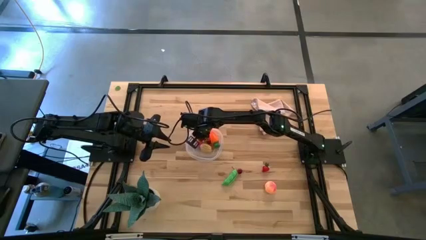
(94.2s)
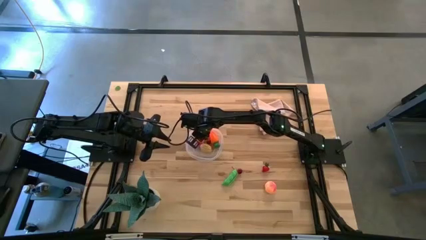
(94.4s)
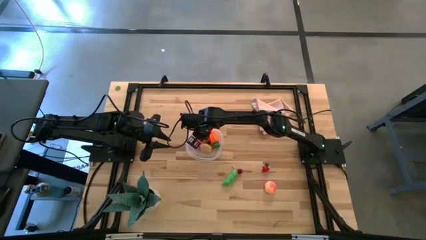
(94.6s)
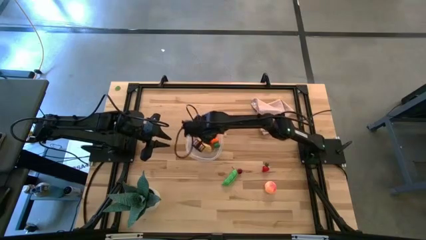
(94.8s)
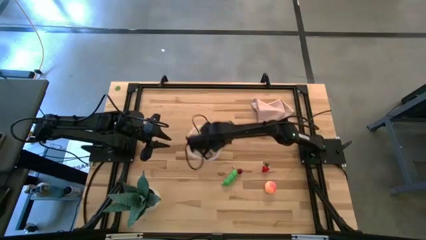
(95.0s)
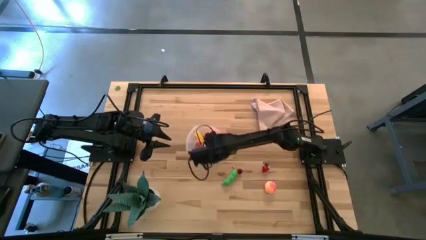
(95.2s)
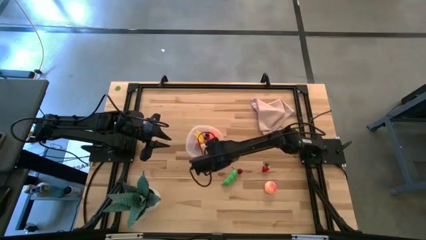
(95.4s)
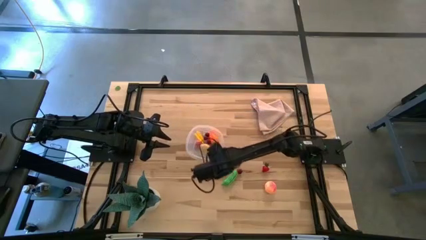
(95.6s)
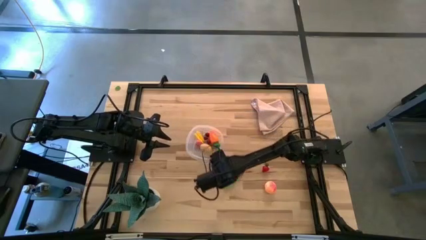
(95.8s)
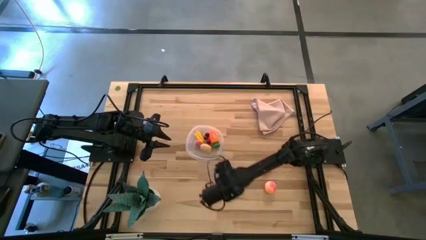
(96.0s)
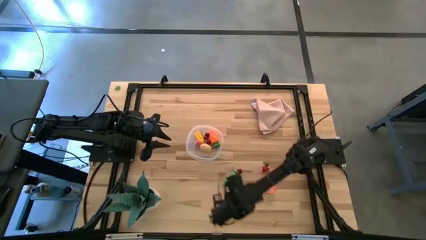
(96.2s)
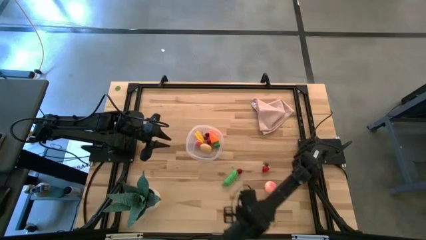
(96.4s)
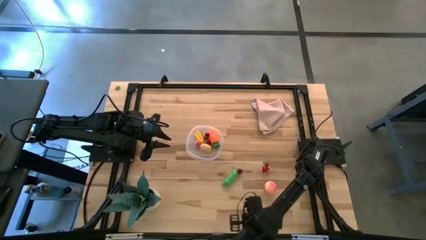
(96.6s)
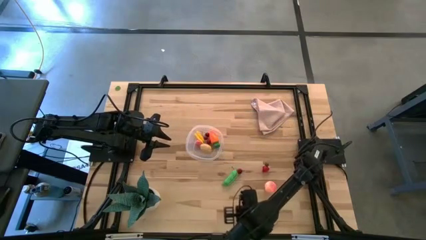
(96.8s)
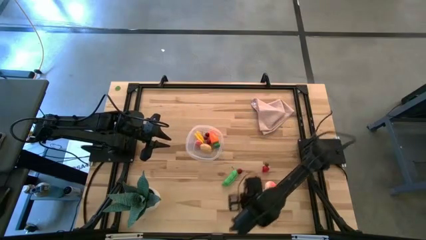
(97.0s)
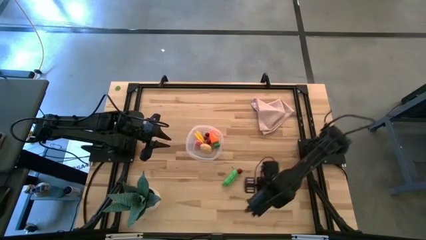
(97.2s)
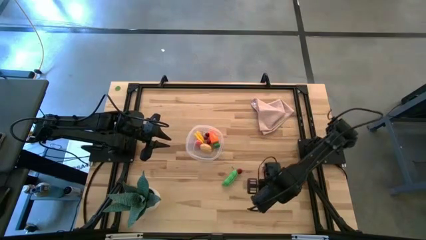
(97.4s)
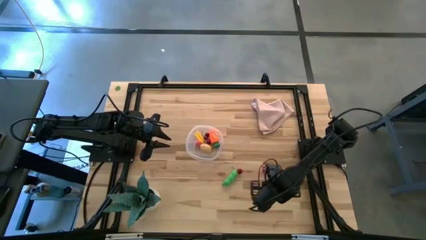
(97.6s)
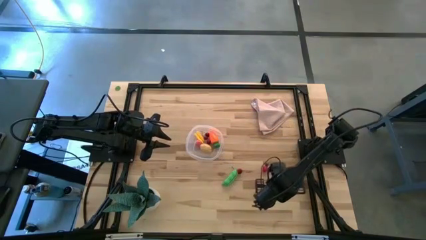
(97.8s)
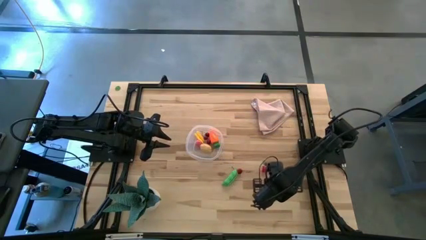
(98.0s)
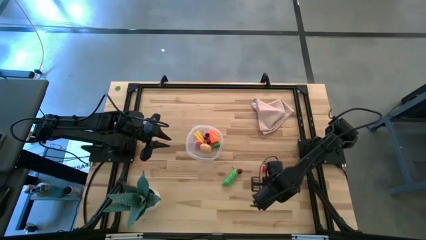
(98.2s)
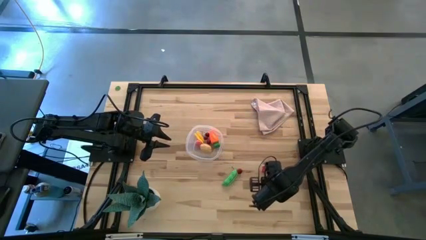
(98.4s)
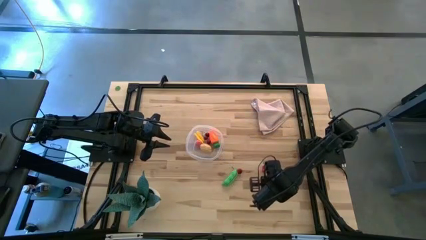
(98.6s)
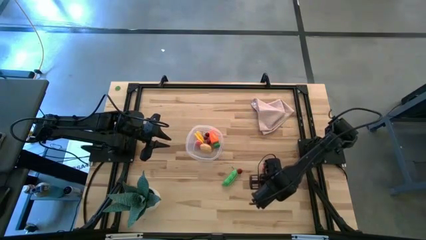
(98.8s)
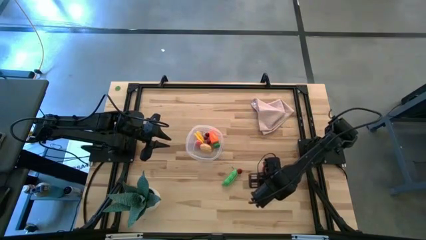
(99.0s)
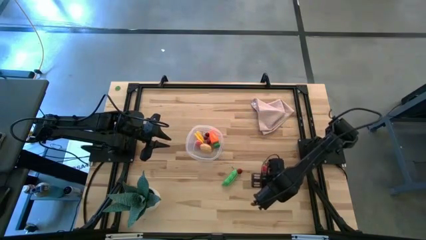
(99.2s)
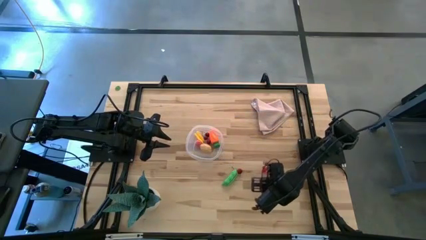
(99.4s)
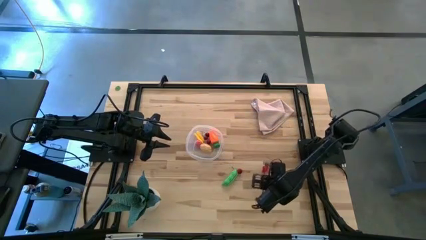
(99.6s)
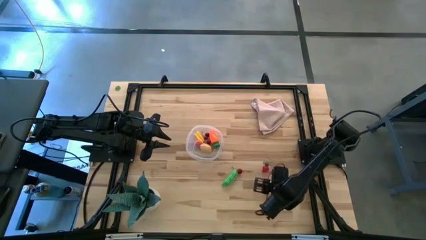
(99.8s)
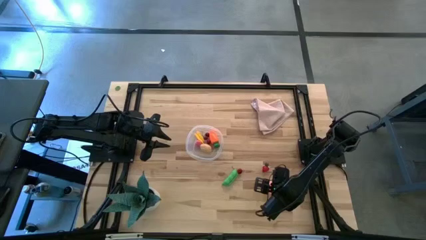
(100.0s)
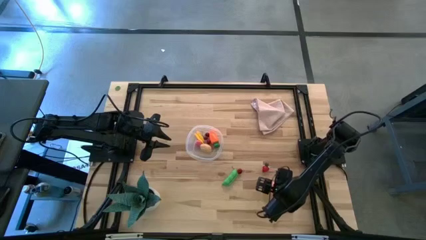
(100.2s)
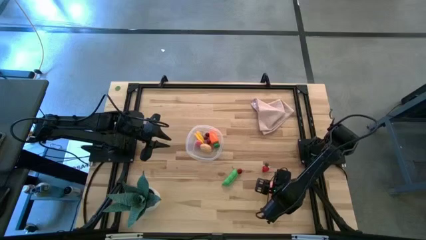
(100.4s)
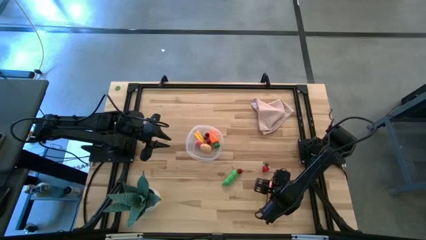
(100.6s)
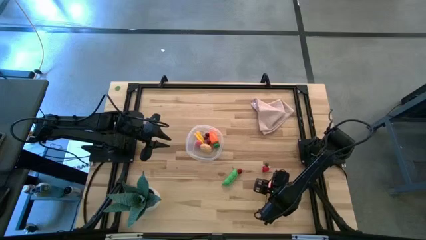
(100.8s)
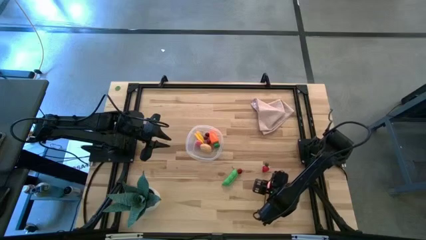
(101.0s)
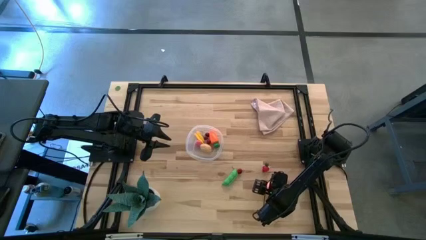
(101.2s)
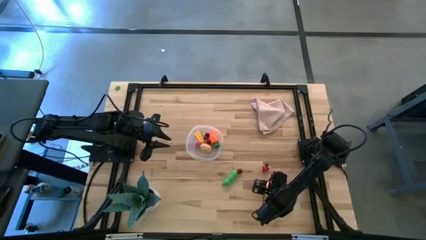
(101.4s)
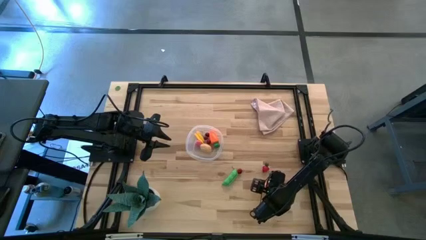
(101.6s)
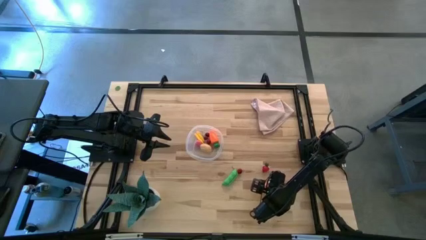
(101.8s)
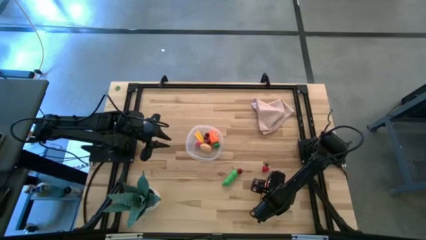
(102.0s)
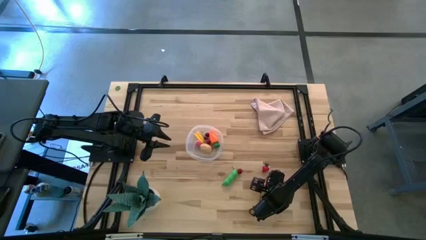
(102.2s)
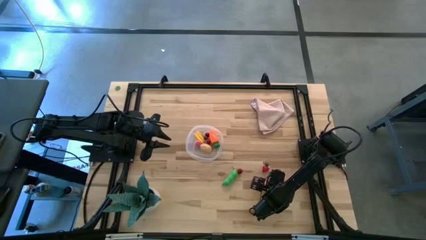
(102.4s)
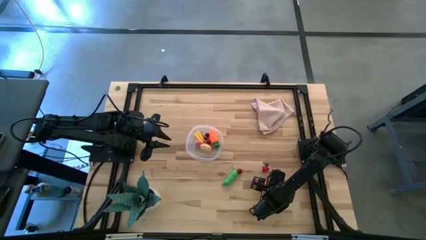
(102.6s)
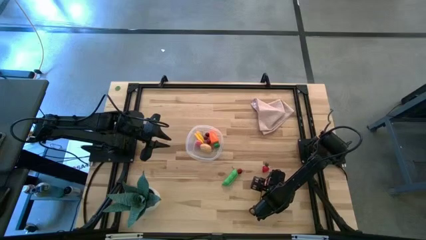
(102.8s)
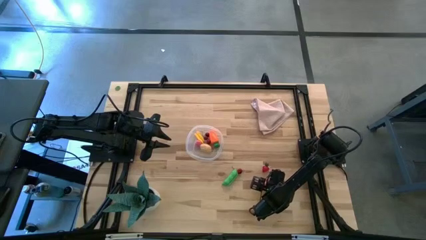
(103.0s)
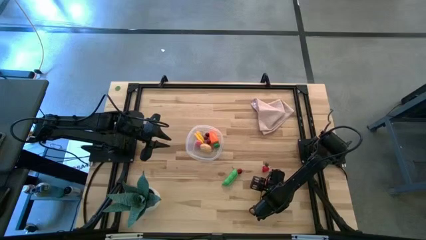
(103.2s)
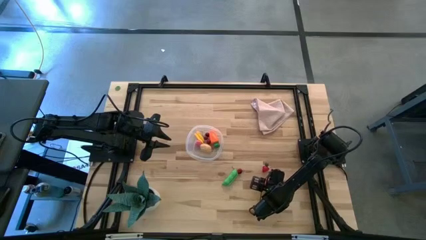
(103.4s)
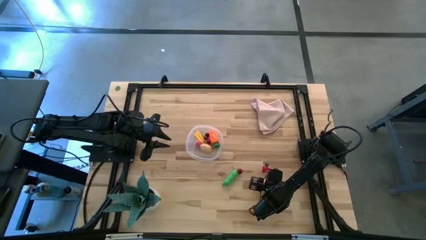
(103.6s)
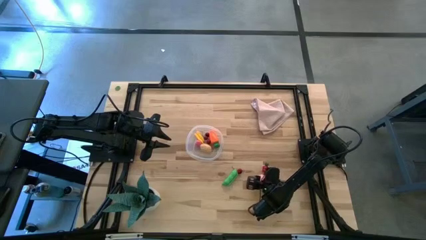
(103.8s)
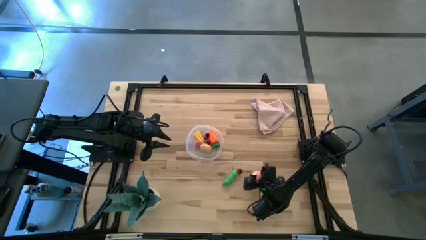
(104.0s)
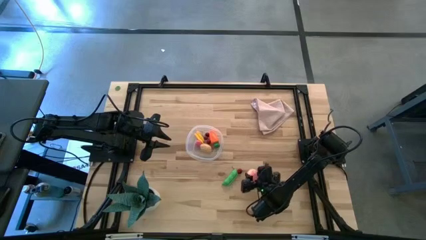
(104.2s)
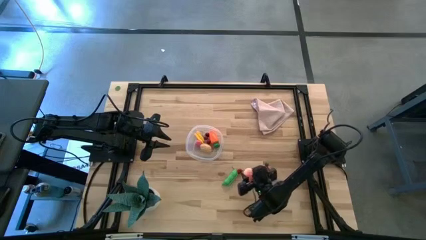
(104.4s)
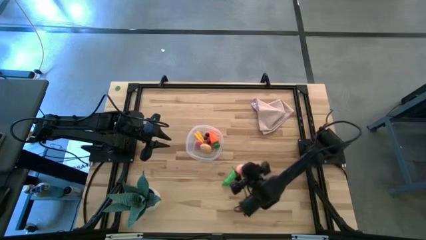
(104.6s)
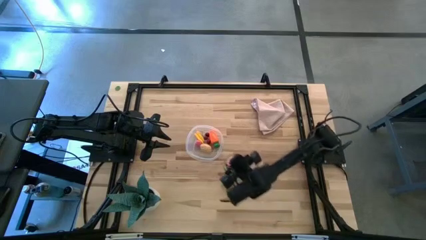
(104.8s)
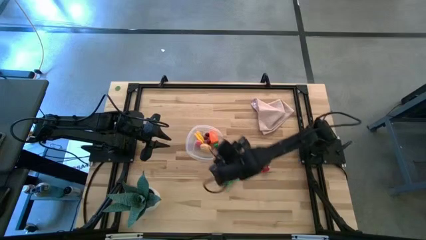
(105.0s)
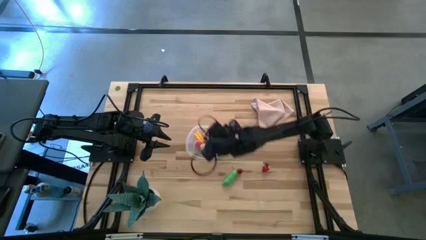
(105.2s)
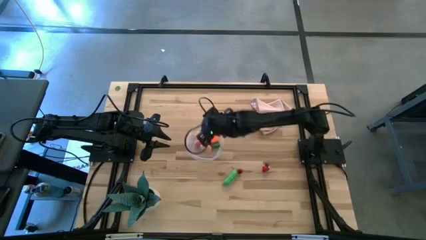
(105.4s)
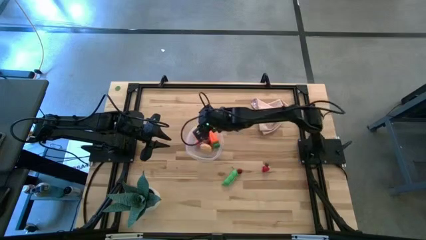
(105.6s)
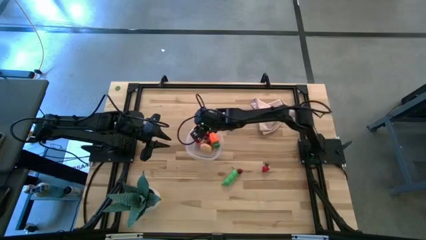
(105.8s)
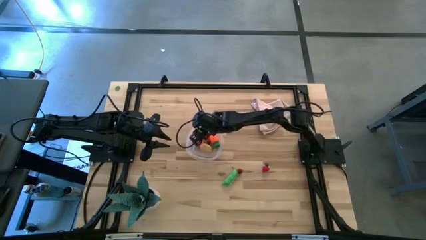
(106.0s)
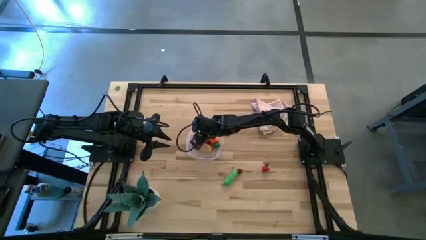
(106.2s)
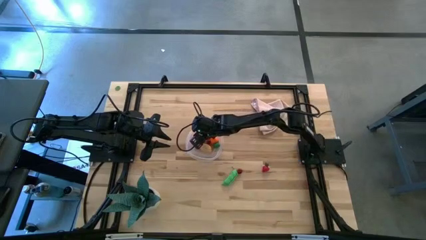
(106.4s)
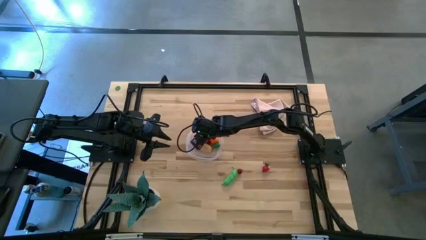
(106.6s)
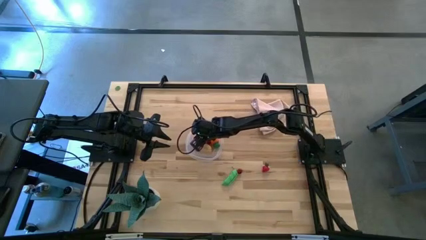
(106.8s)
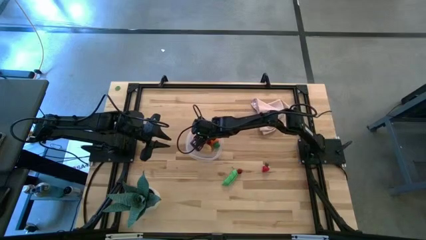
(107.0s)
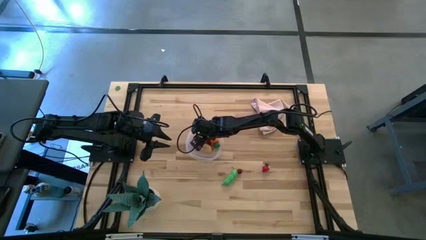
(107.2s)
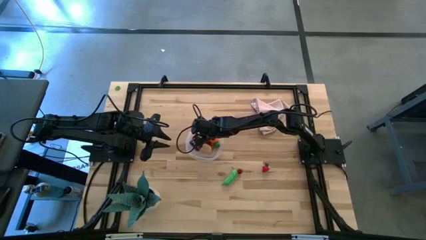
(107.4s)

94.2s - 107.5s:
Task: Pick and placing Produce into tupperware
Put the peach into the transparent bin

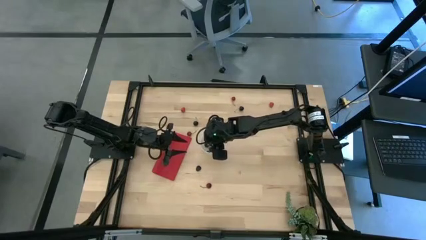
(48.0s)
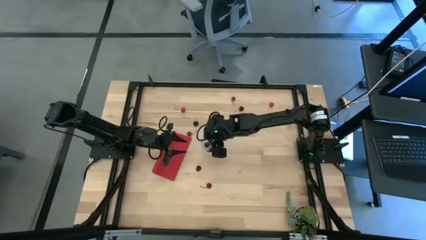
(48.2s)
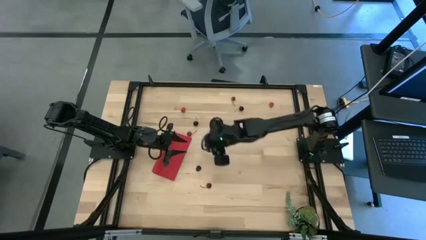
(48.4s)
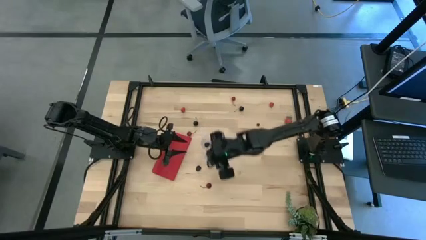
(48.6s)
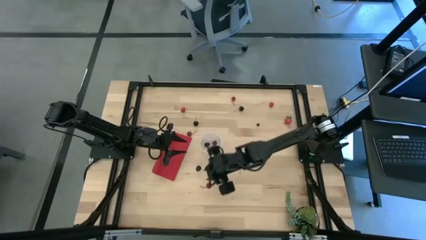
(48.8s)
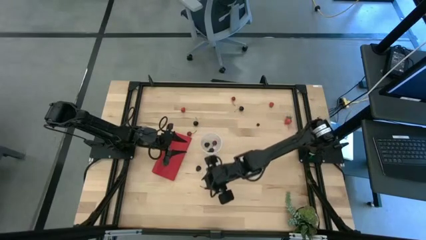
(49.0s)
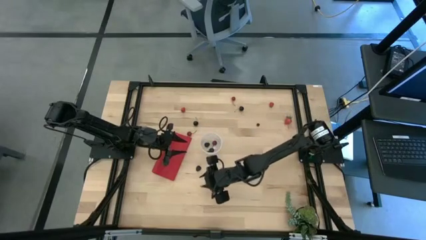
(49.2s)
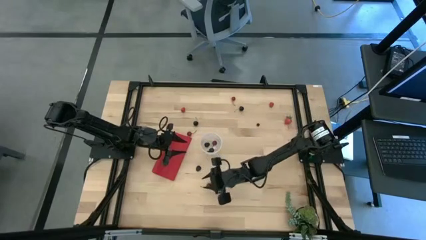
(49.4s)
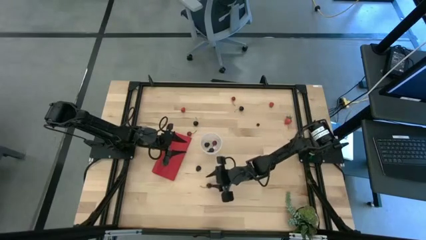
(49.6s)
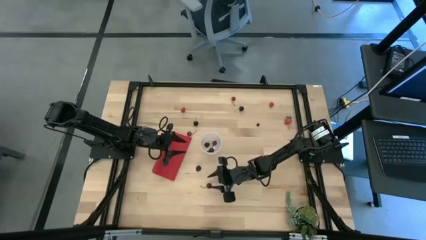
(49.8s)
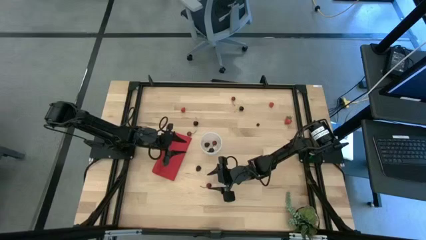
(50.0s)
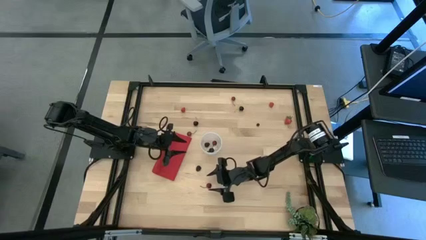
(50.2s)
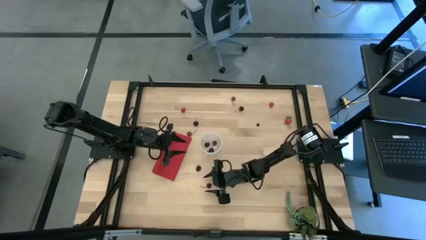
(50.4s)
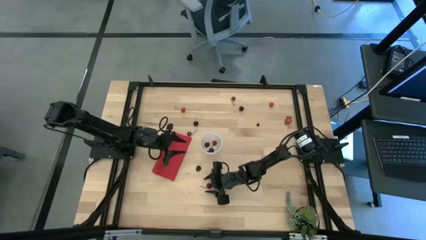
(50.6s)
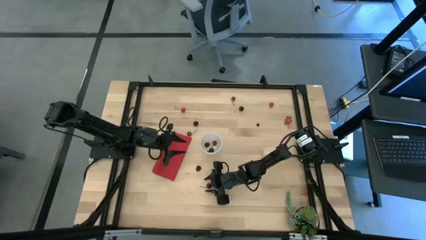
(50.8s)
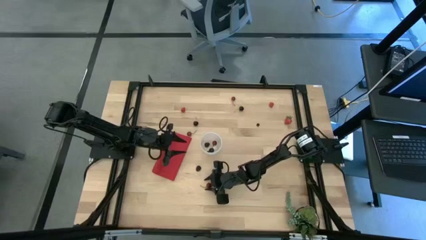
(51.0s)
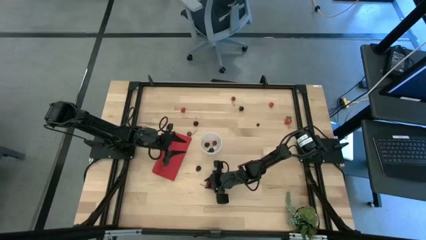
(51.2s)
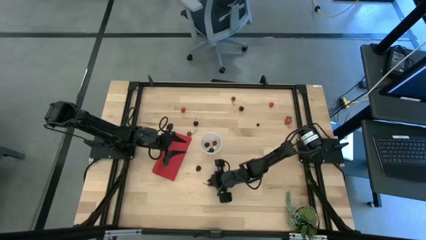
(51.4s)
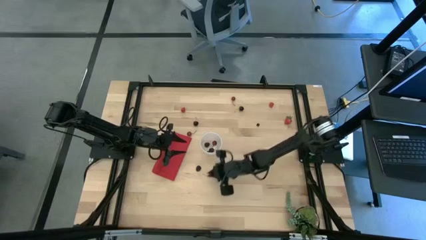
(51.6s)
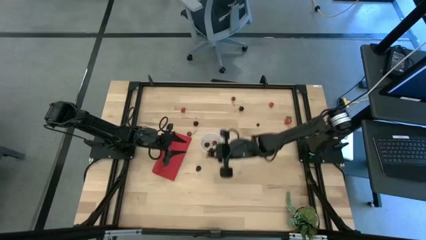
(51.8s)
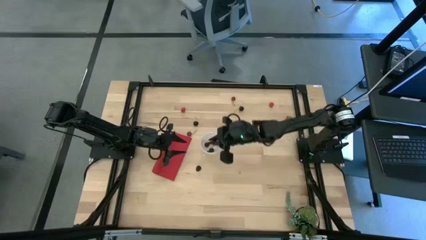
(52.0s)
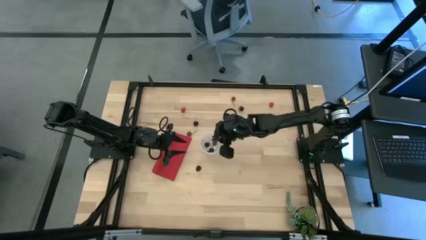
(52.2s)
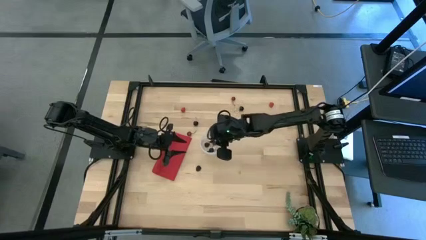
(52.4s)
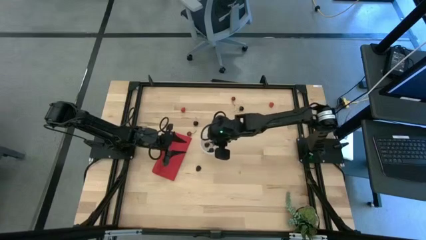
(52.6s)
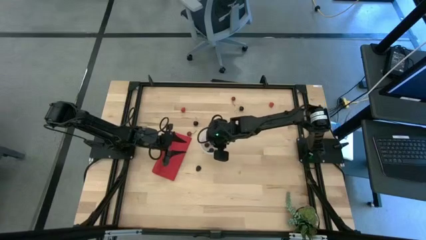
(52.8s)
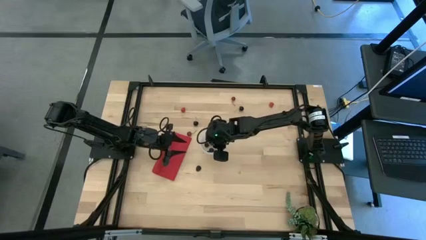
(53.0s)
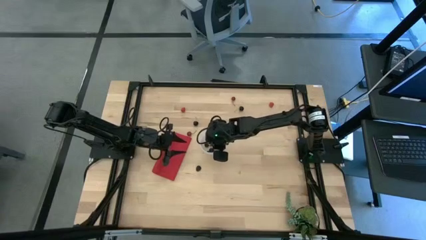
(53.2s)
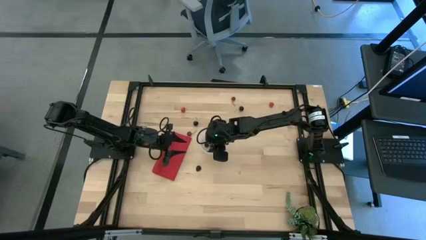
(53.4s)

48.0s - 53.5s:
Task: Pick and placing Produce into tupperware
Put the red cherries into the transparent bin
